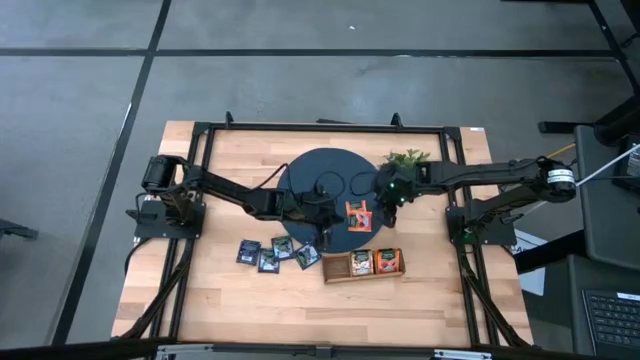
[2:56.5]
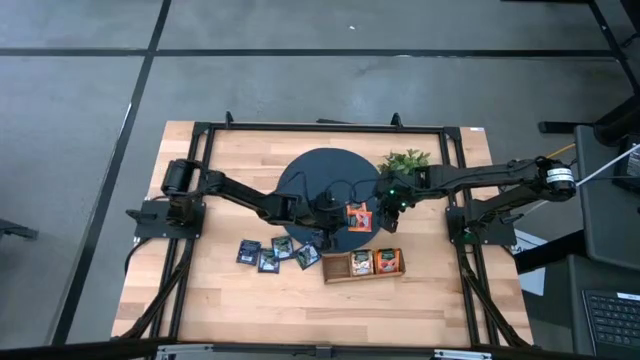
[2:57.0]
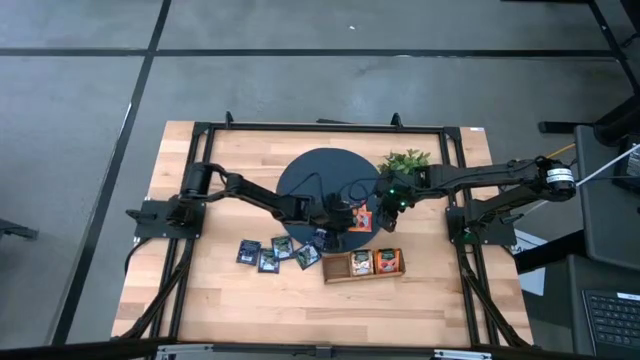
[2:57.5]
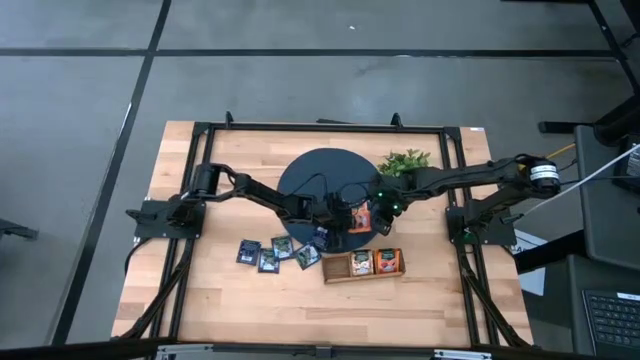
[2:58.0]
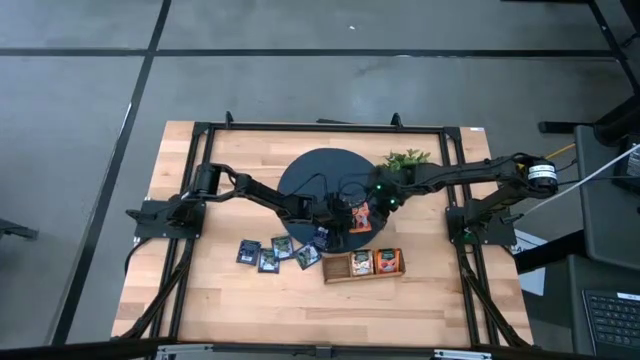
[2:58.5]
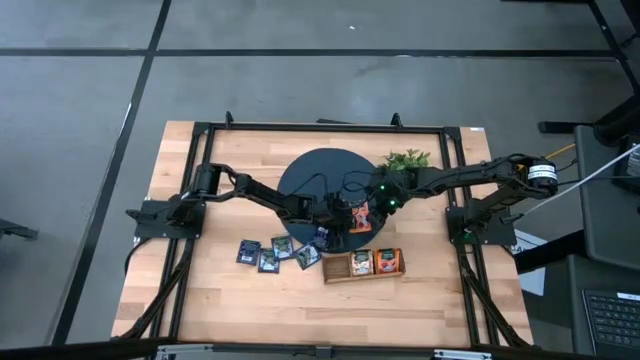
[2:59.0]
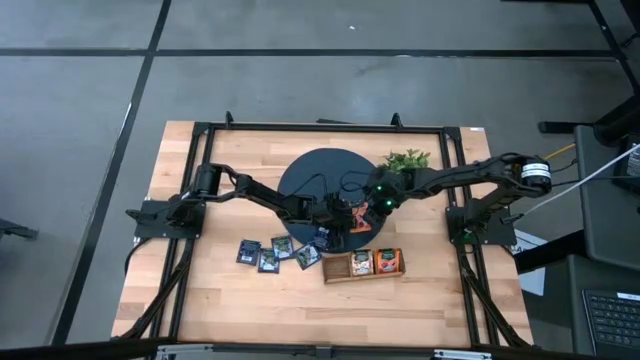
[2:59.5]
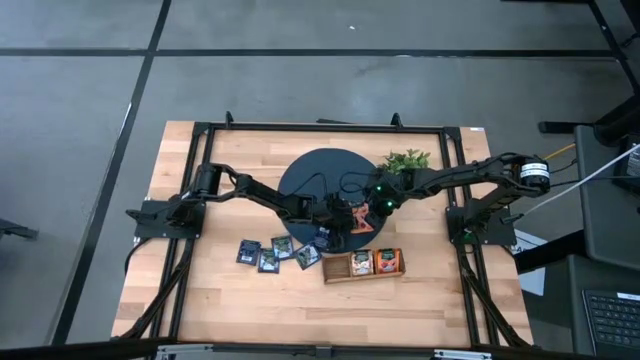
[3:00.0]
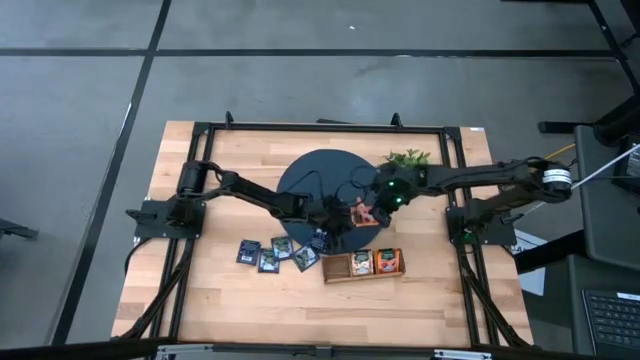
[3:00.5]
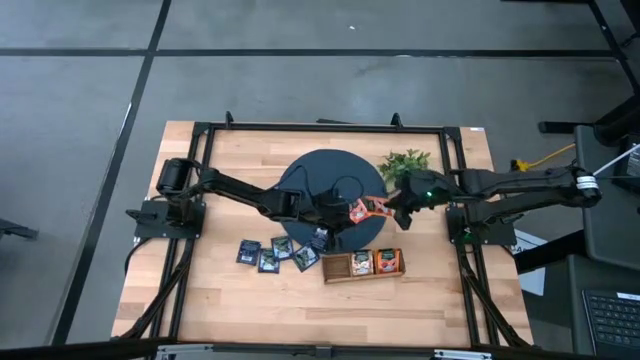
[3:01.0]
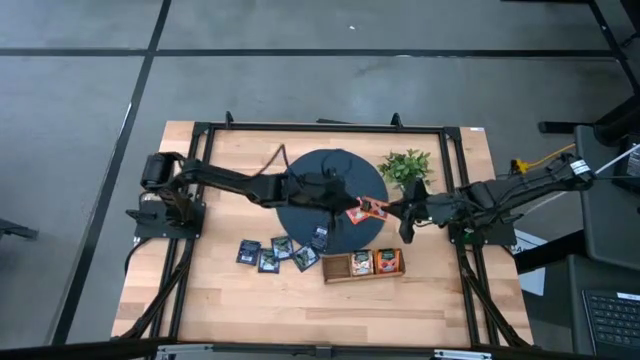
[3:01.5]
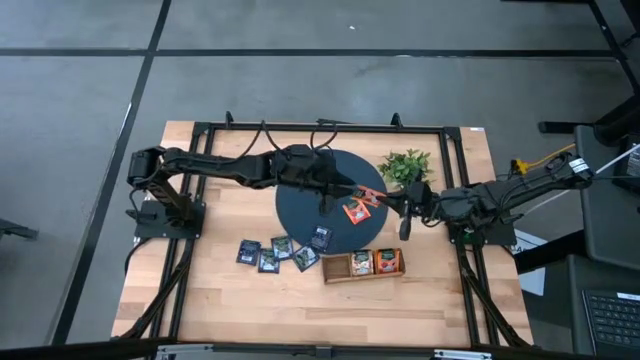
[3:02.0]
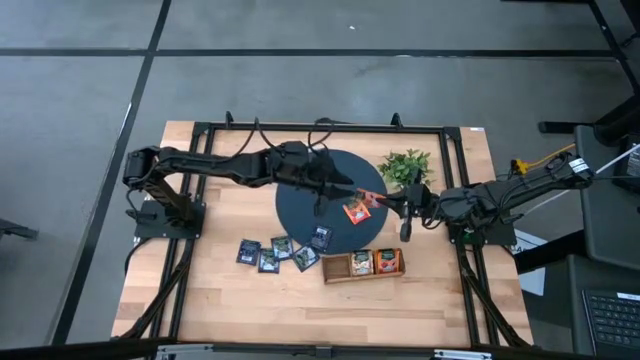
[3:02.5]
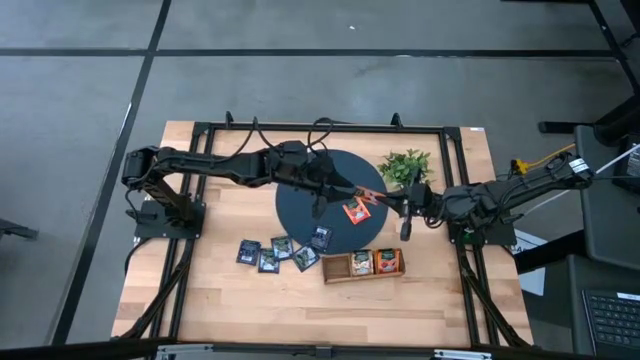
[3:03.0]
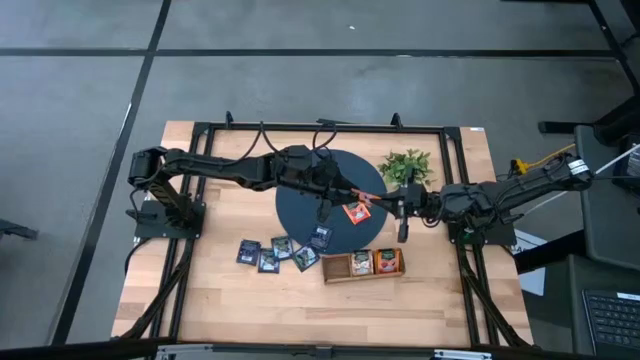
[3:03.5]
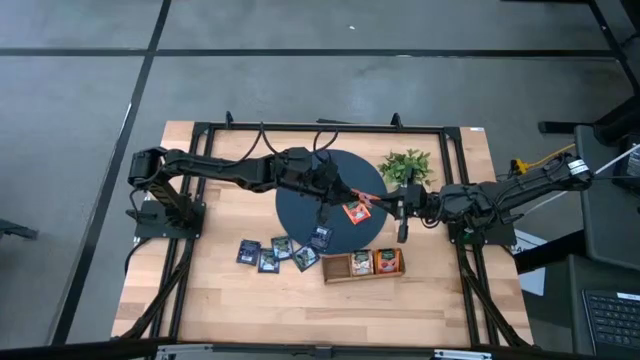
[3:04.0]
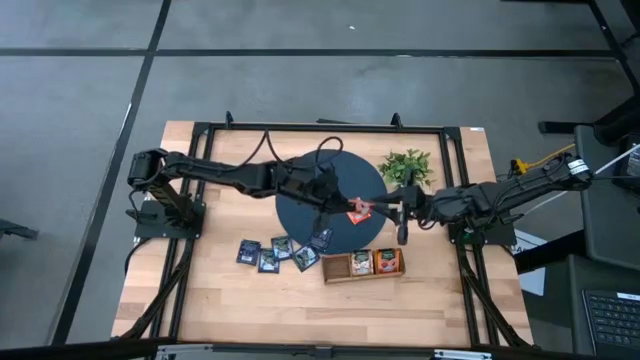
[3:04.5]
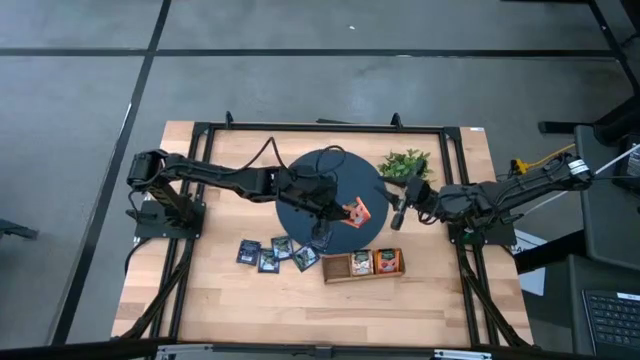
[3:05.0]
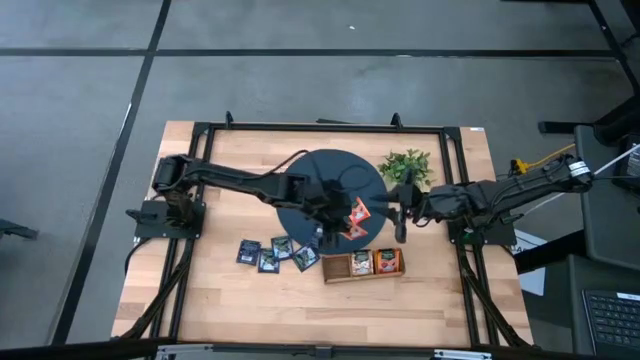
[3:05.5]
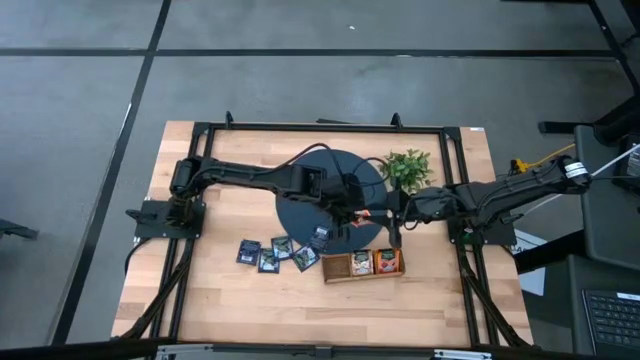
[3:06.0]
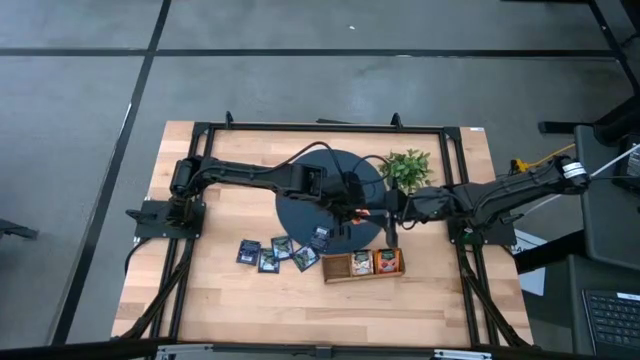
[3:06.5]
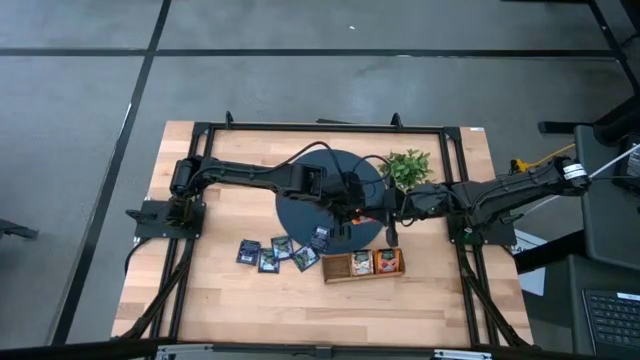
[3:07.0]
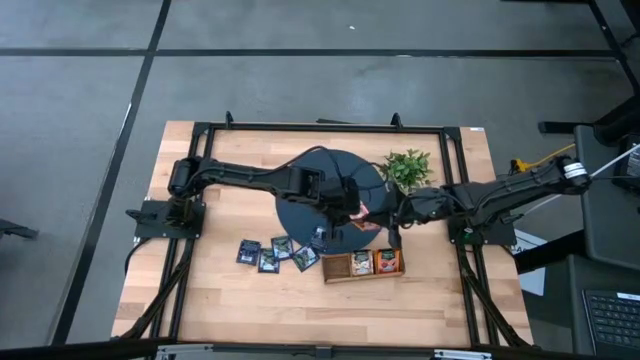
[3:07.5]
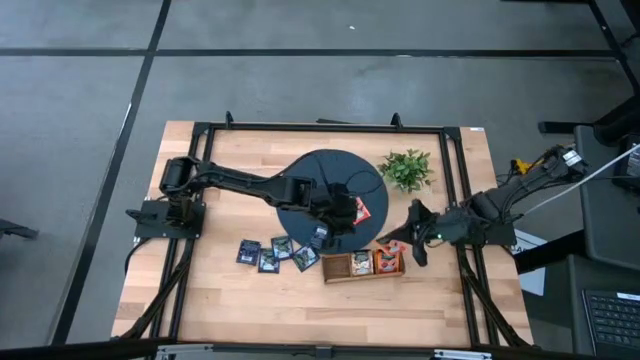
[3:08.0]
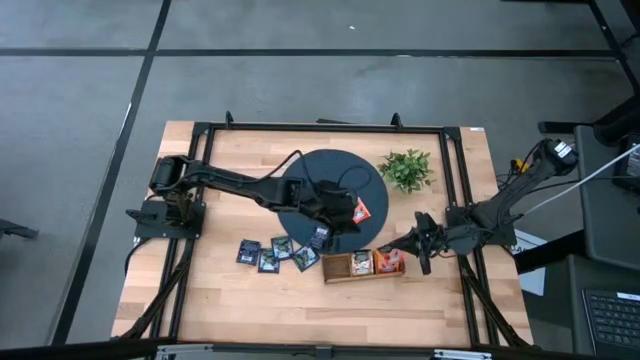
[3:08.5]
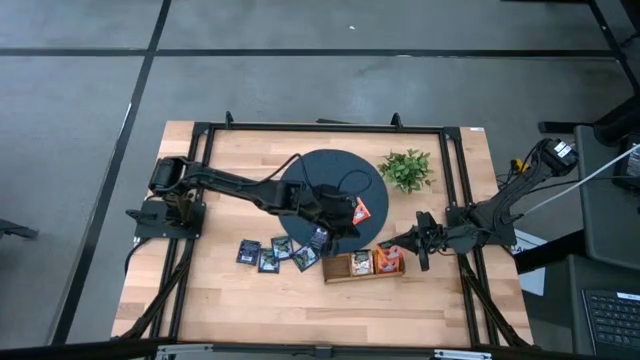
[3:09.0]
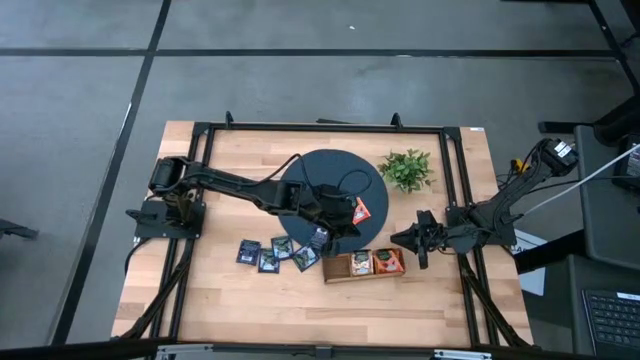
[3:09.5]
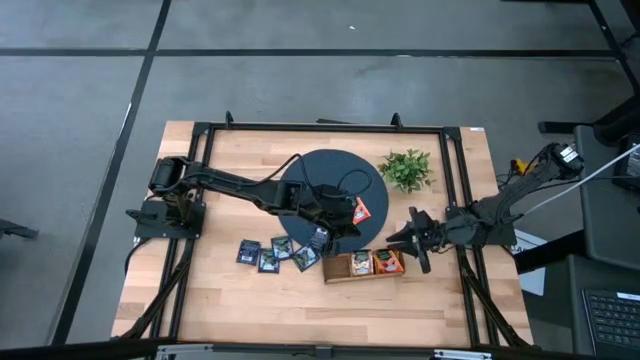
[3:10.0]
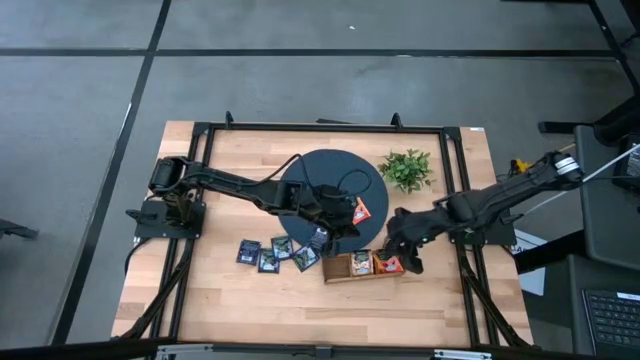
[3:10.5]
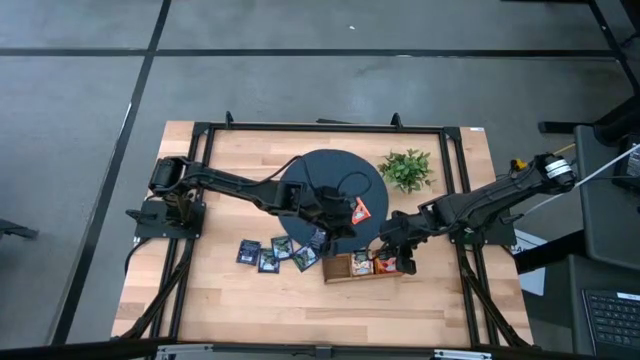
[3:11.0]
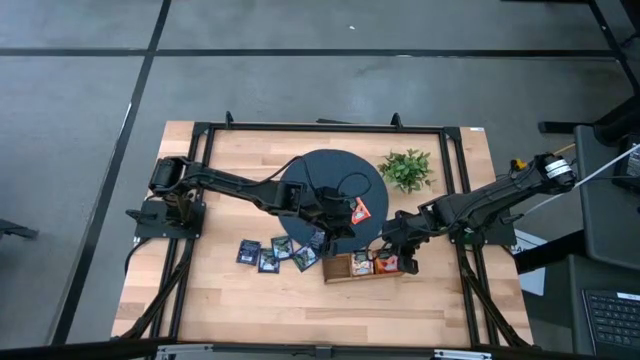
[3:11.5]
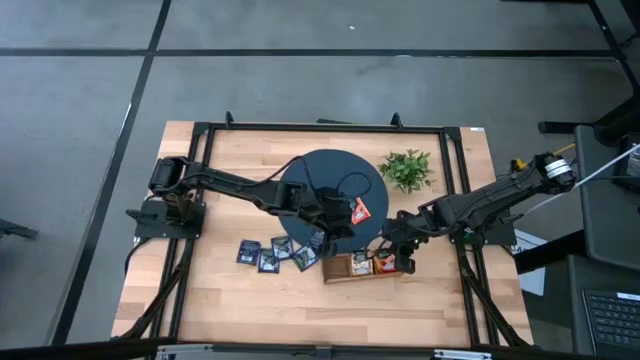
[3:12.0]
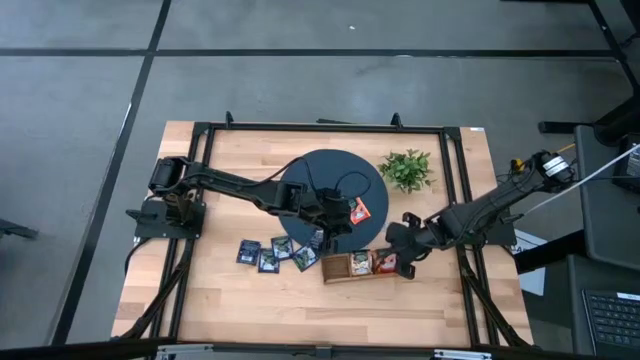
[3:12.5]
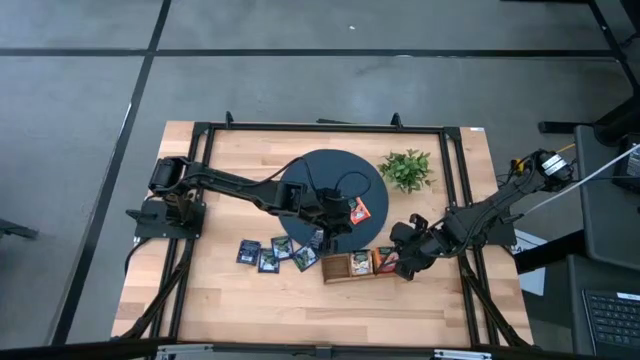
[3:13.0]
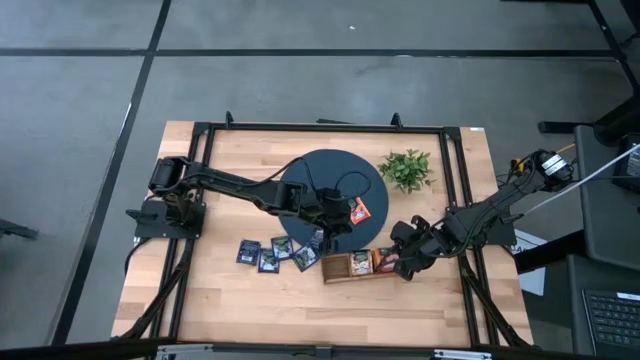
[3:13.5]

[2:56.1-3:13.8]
Task: Pick & Place Tea
Put the orange tea bag into the right section of the wooden organizer
